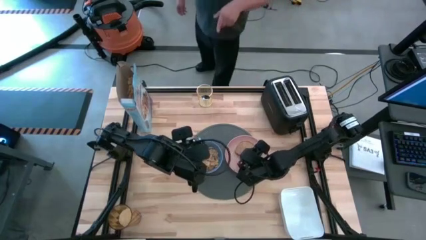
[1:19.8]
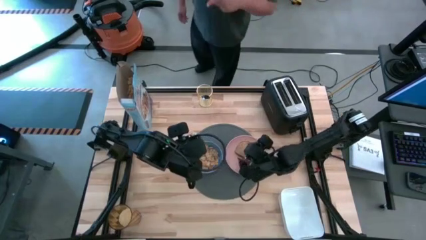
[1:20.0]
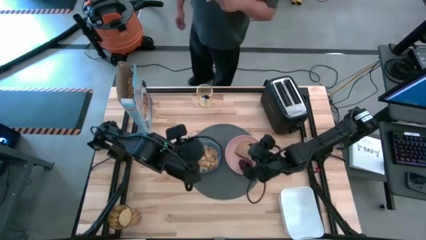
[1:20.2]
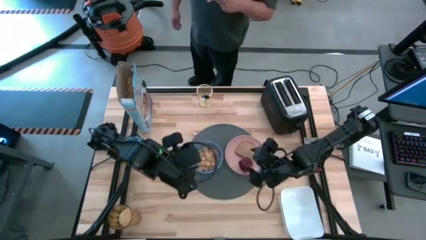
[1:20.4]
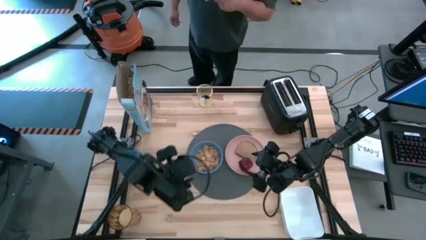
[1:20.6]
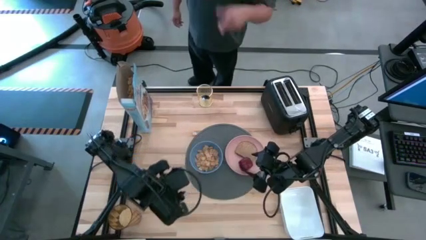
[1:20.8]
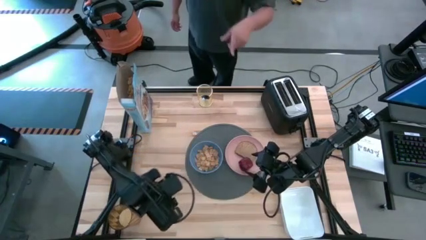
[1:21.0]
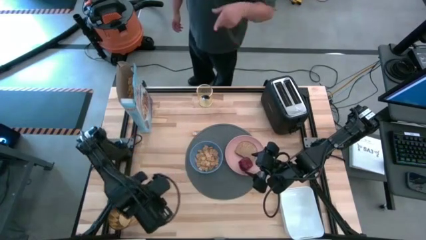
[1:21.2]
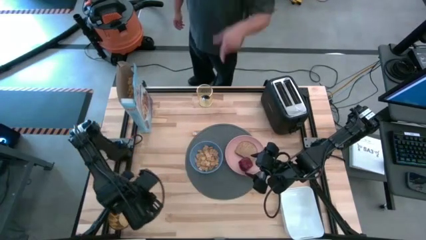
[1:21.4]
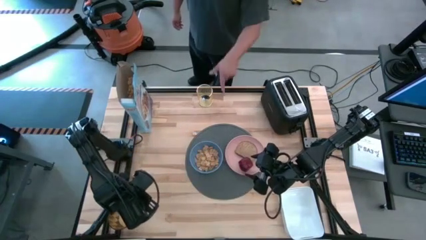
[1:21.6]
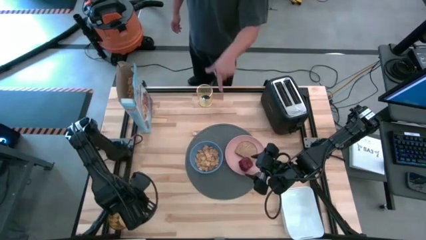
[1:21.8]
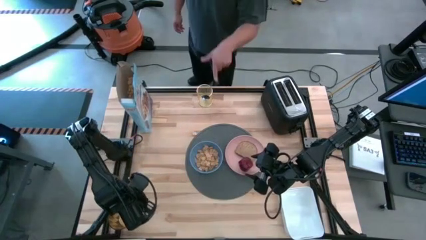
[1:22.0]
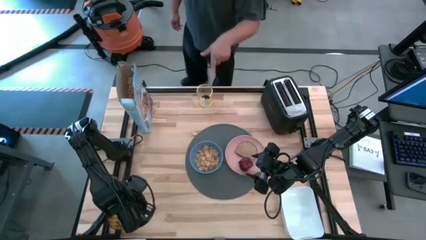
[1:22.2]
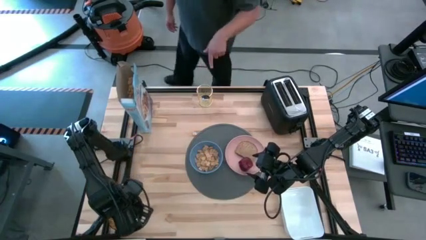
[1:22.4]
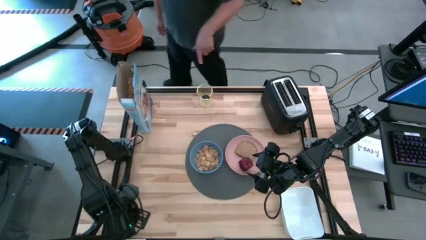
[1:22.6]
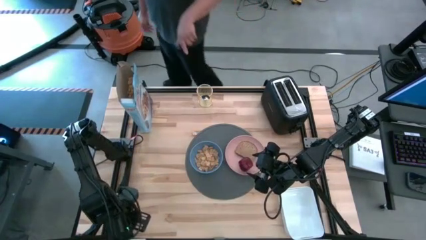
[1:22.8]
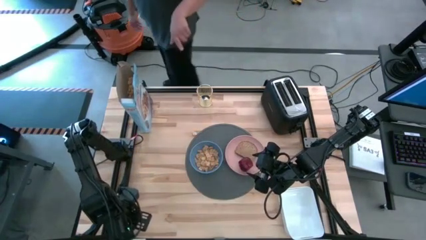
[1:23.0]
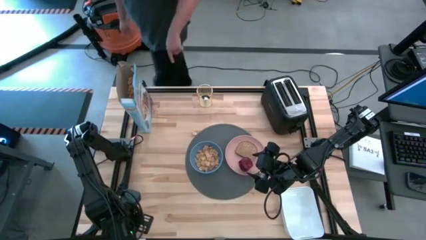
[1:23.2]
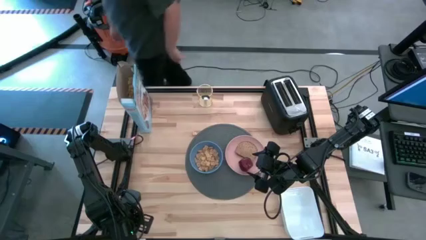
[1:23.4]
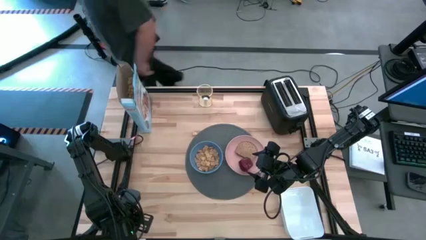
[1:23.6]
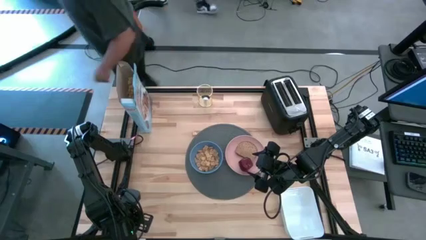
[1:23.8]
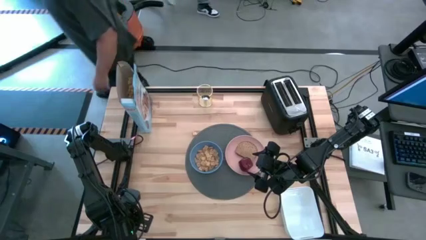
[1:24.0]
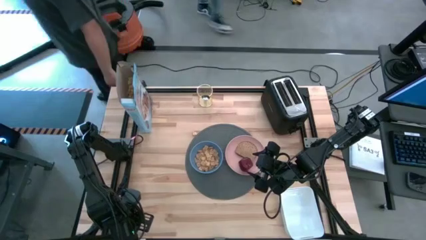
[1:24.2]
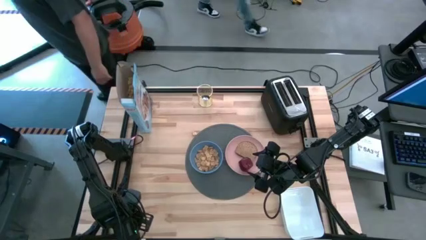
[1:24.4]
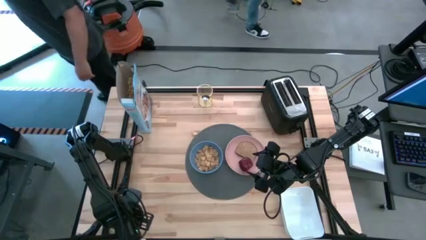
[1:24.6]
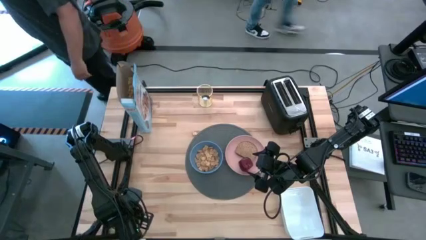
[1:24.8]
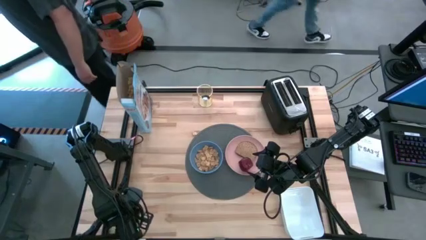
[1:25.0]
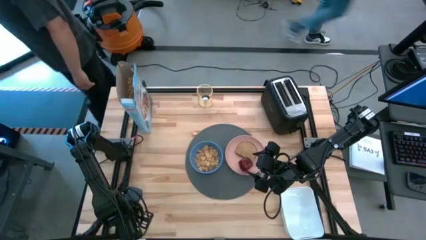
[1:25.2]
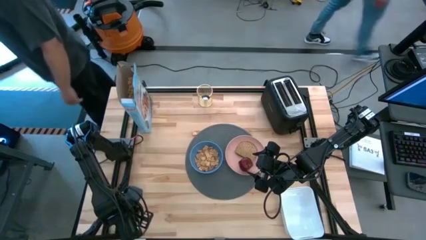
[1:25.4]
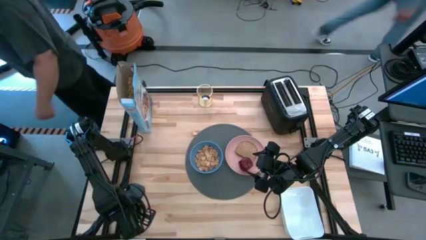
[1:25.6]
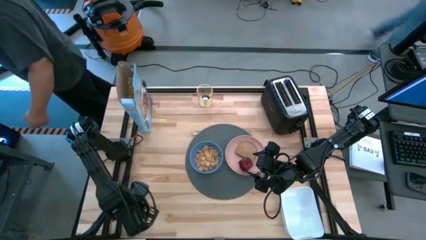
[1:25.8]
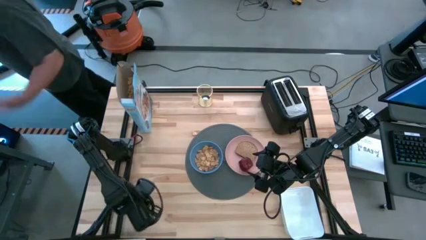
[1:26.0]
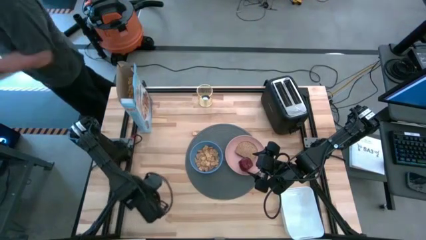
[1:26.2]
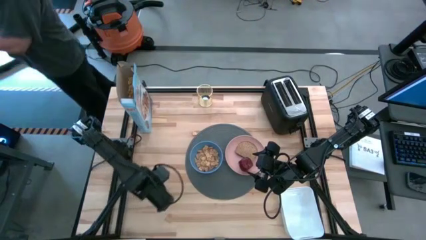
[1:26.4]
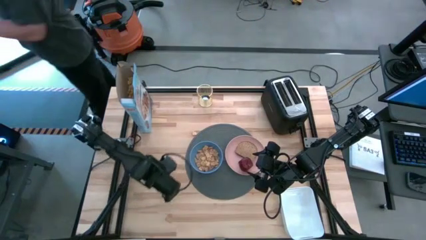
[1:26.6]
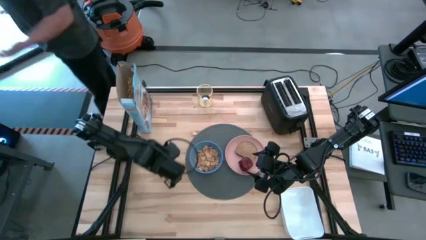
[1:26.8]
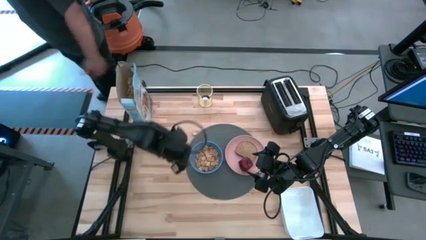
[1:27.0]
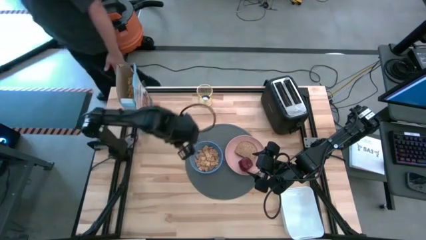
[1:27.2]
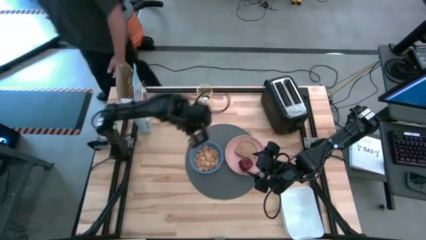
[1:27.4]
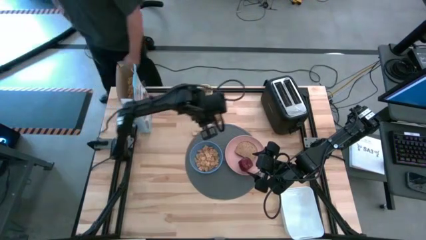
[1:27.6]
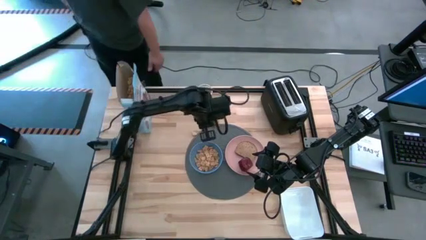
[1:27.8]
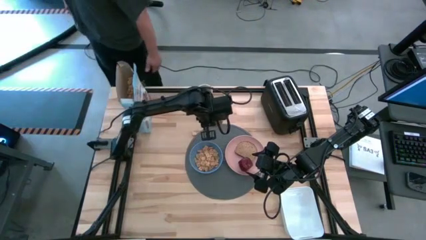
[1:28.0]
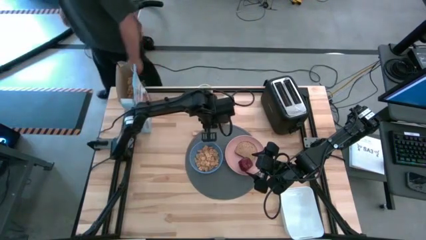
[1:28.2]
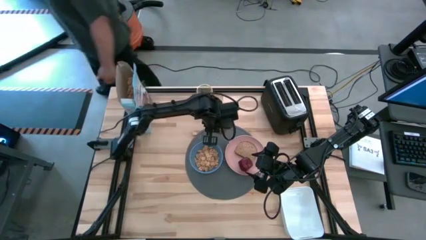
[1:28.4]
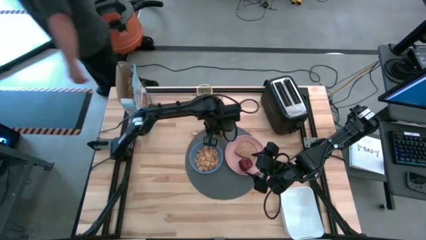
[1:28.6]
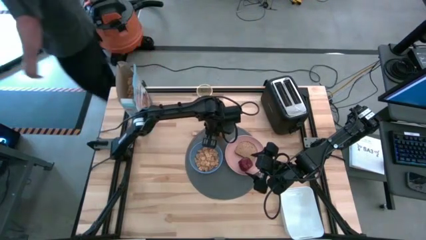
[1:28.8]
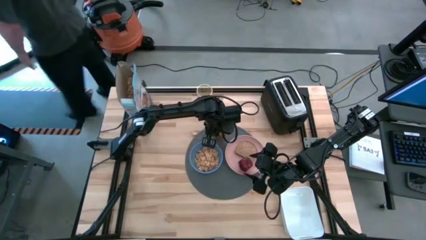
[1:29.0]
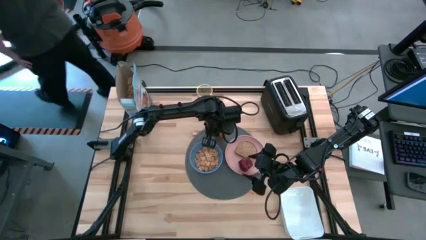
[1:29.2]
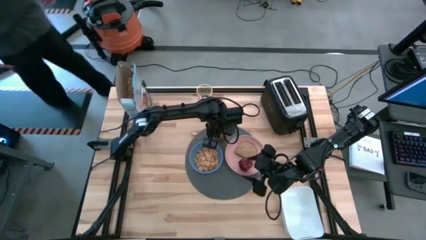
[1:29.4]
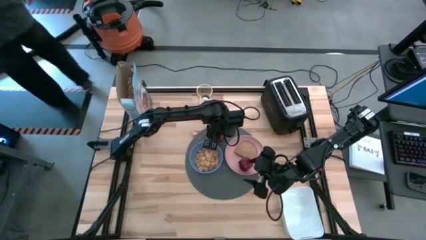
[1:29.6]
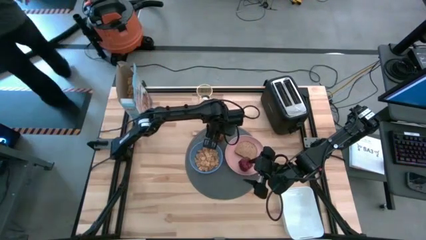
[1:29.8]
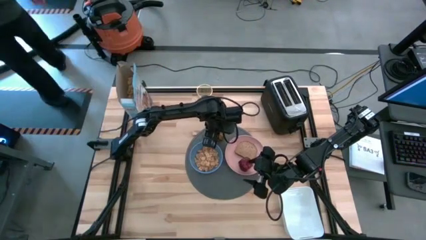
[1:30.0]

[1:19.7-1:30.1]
Task: Arrange a breakfast setting
Put the yellow cup to the top left of the pink plate on the gray mat

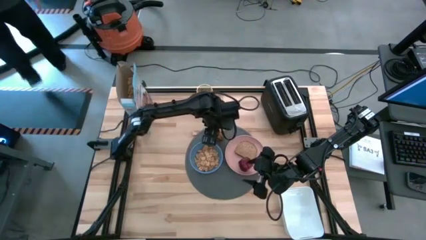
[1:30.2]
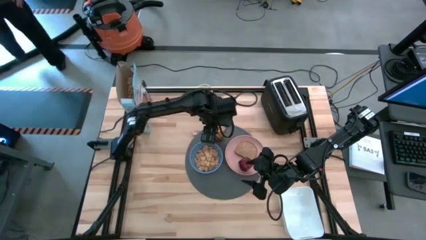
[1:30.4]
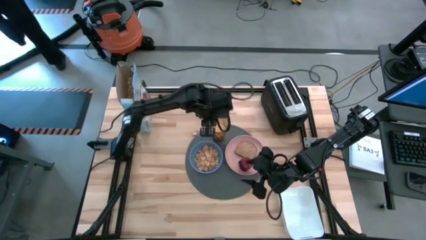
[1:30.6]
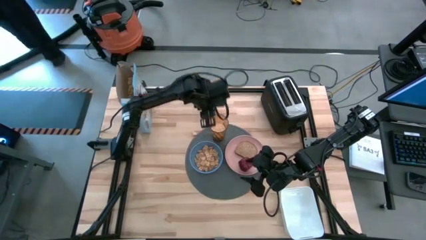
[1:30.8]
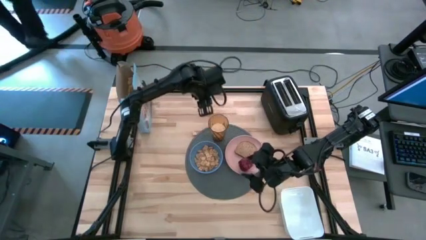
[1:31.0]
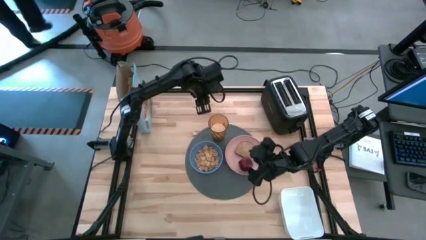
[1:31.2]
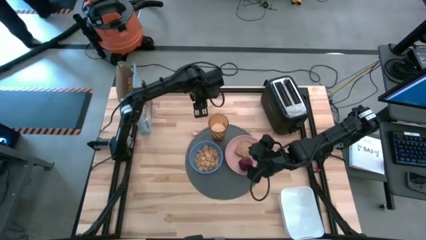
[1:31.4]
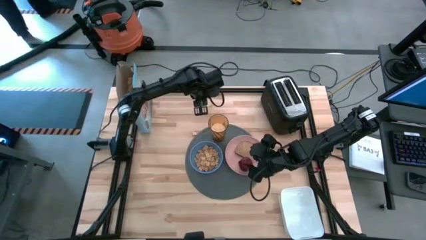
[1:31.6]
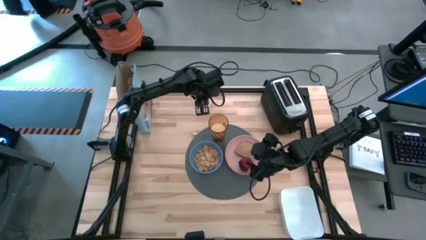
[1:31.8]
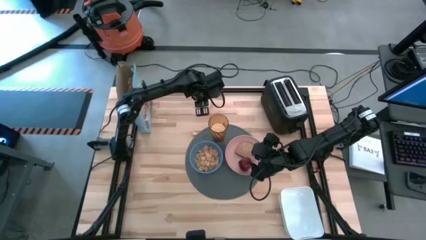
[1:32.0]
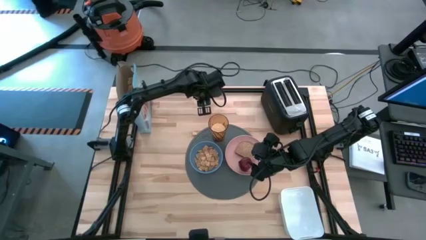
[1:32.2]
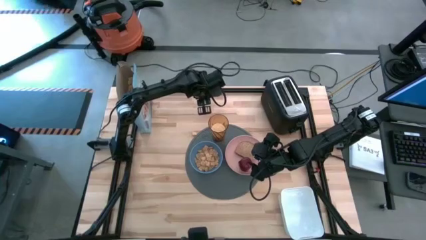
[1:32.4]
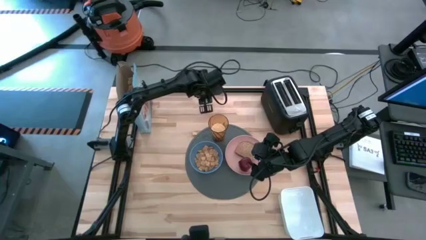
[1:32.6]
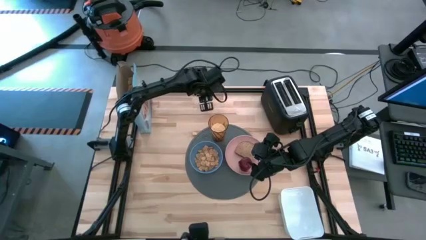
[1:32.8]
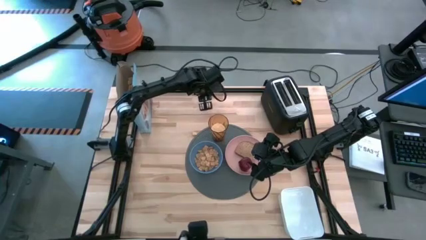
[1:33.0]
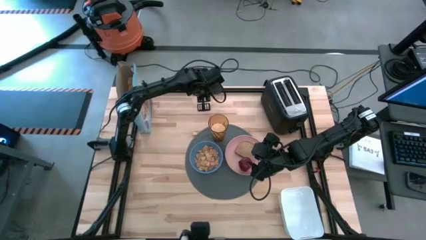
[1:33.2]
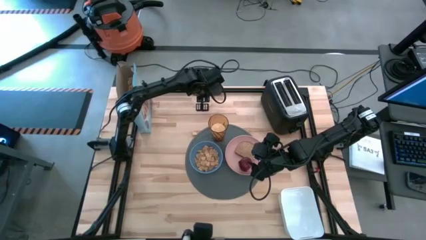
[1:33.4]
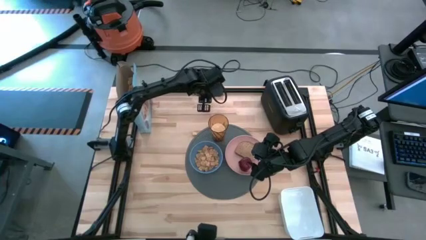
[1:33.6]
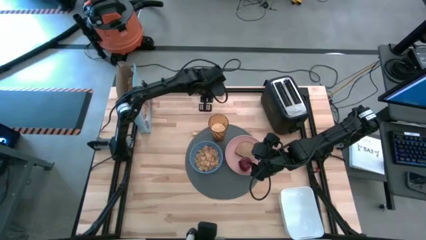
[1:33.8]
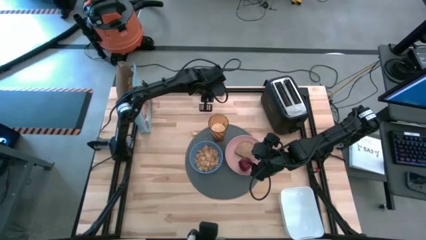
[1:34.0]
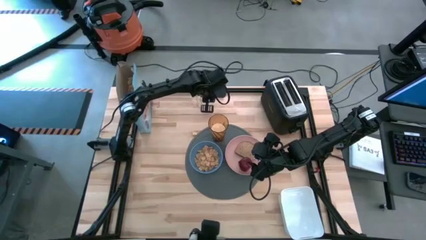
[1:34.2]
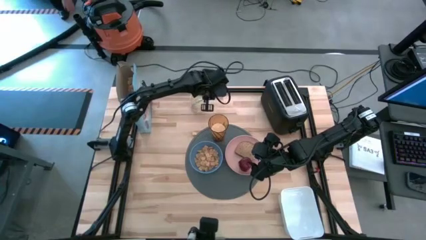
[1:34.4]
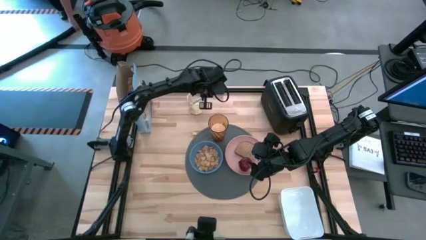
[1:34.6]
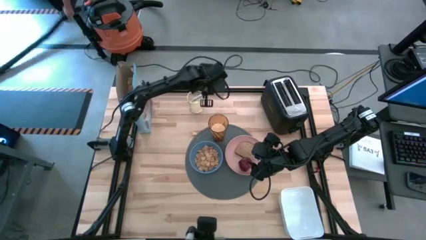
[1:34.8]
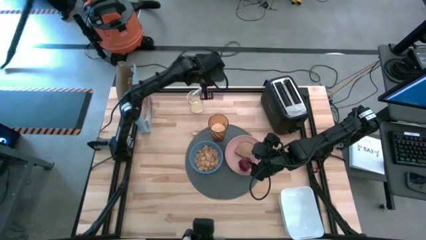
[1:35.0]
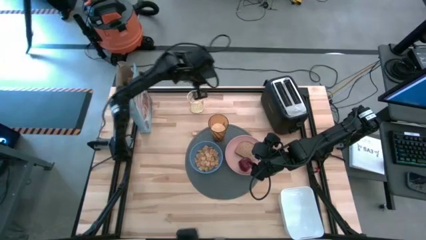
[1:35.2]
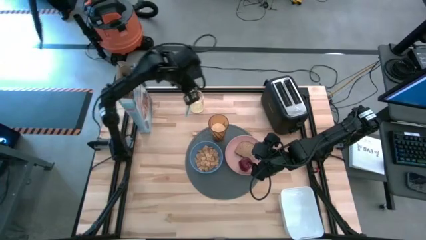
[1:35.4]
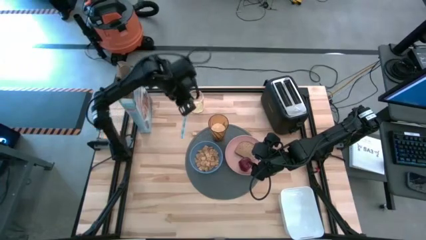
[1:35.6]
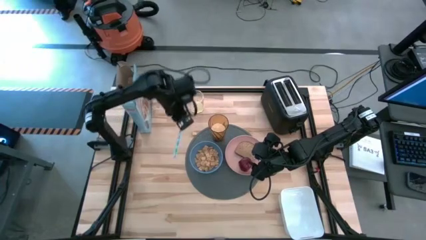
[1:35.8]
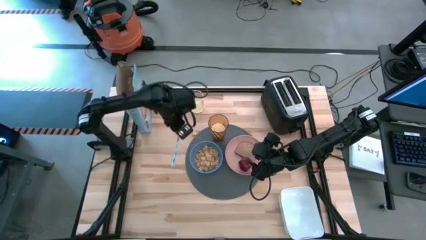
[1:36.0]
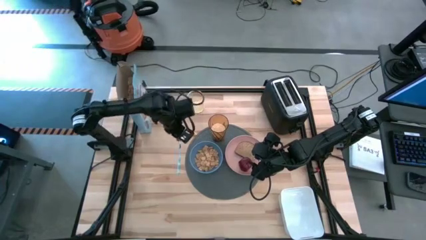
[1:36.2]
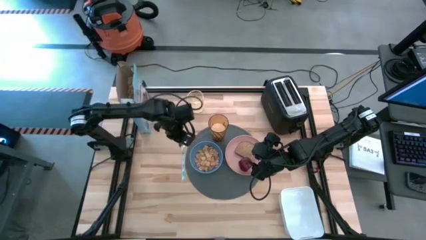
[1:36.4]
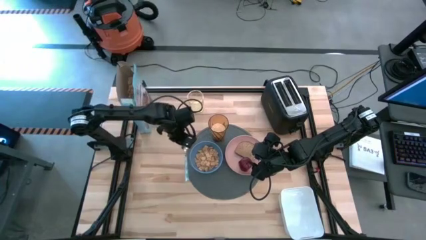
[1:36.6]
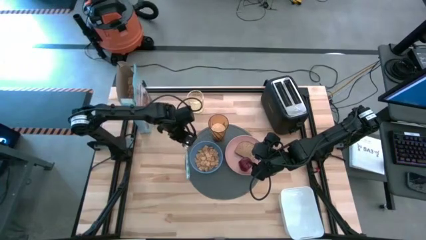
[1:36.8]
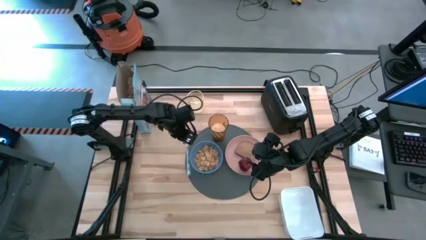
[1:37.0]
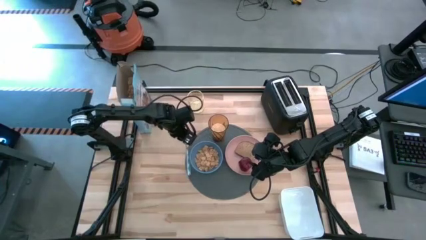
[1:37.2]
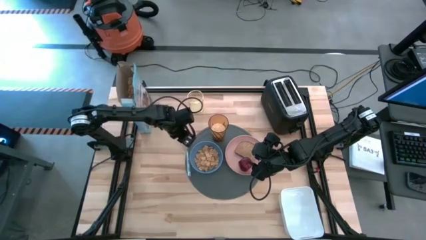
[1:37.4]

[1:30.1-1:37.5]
Put the white patterned spoon beside the blue bowl on the gray mat
